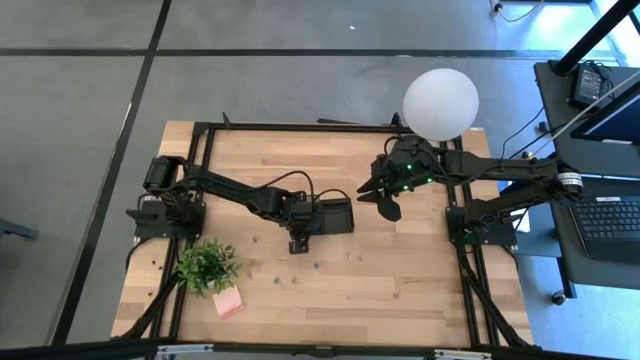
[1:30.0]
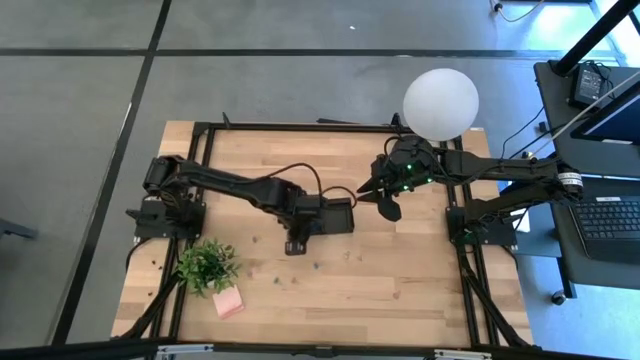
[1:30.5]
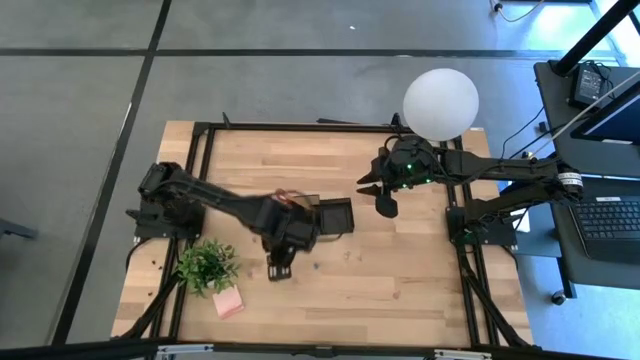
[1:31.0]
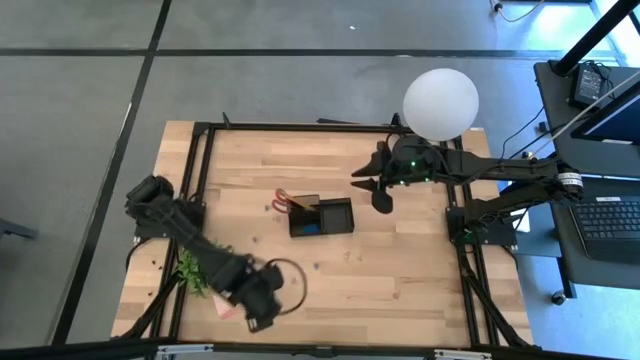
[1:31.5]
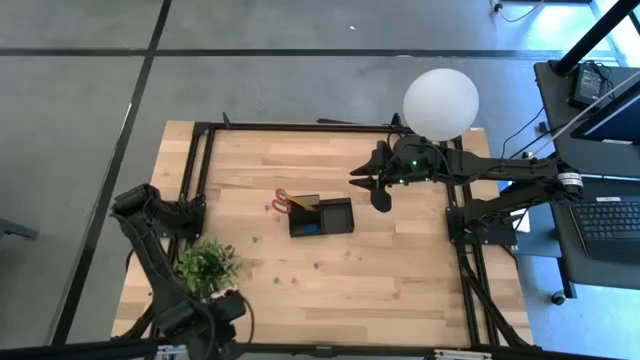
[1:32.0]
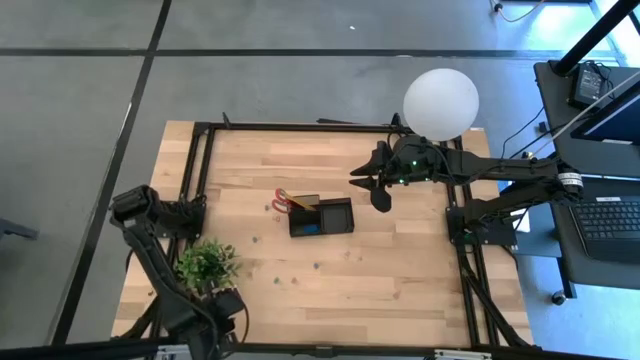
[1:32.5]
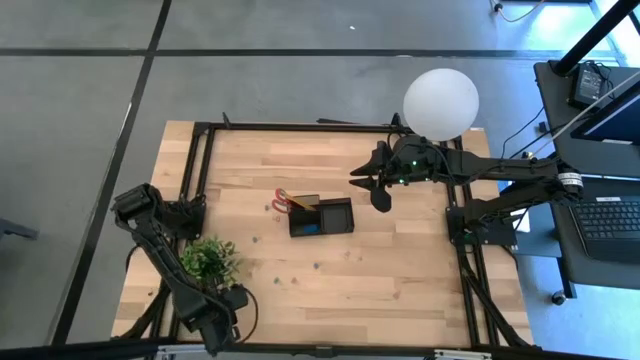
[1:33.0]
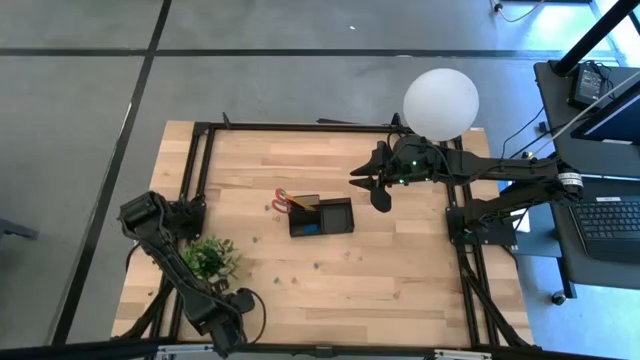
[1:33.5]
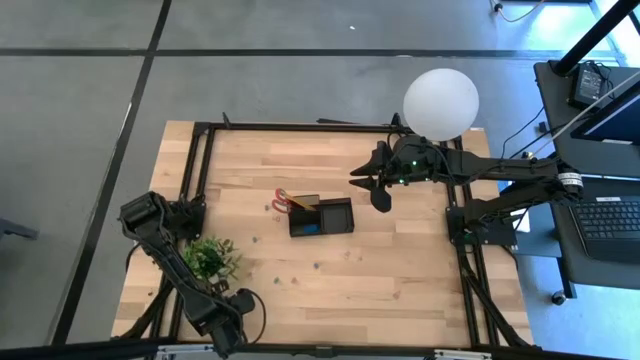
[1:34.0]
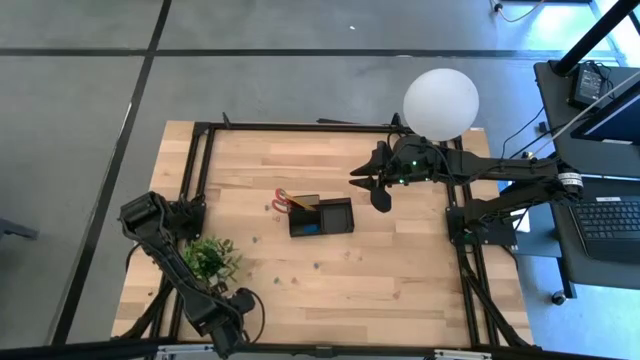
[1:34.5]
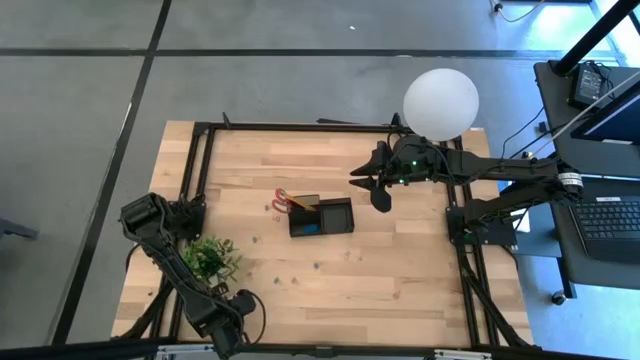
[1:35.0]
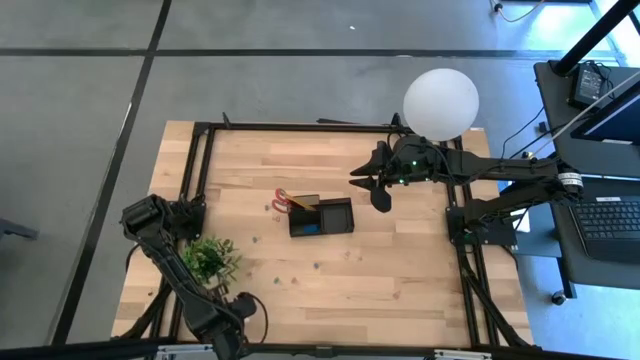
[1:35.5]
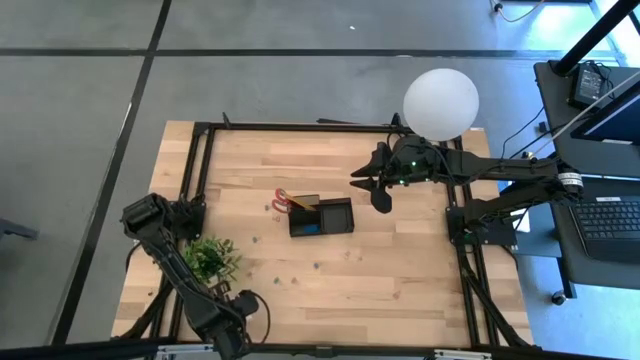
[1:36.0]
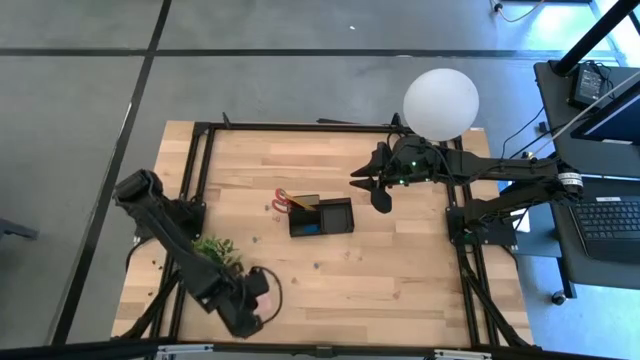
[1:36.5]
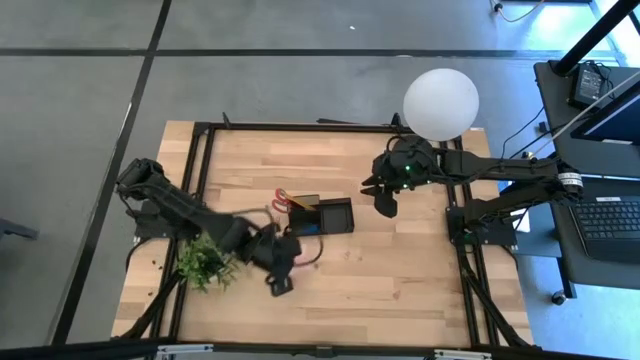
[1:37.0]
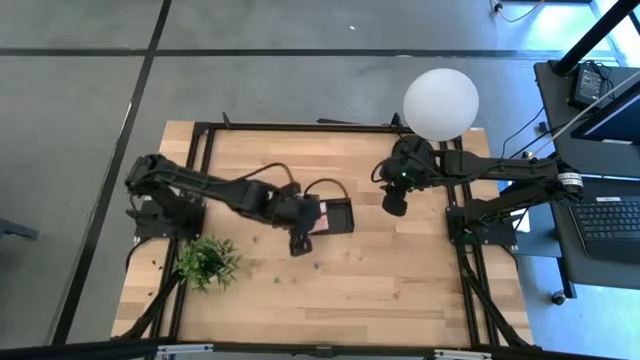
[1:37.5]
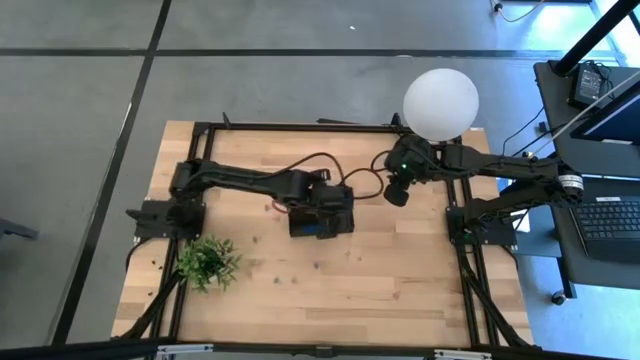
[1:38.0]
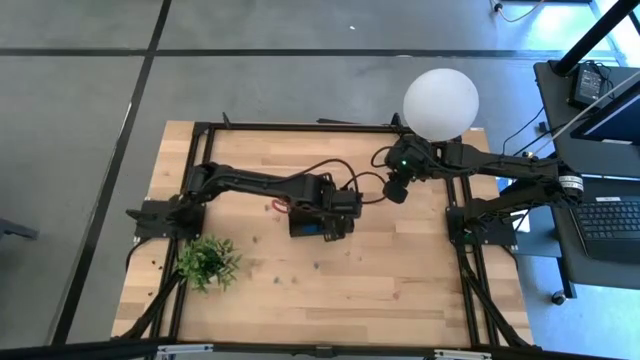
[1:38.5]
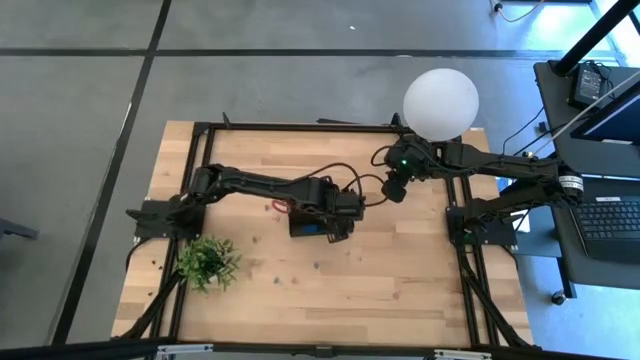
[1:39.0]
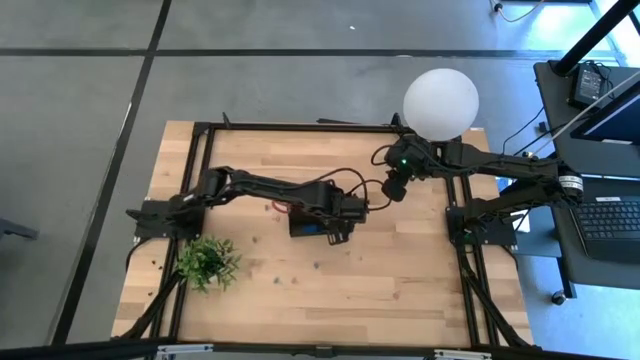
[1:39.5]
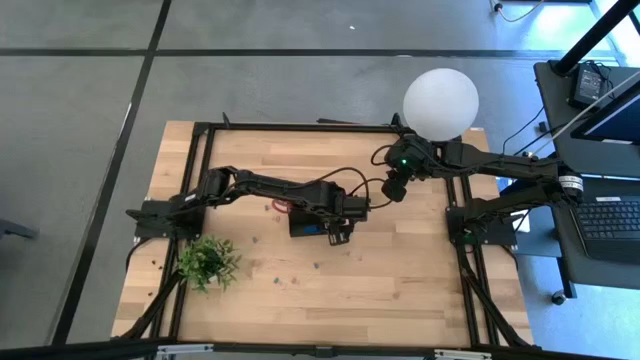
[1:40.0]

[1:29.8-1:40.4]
Task: Pick and place office supplies into organizer
Put the pink sticky notes into the black desk organizer

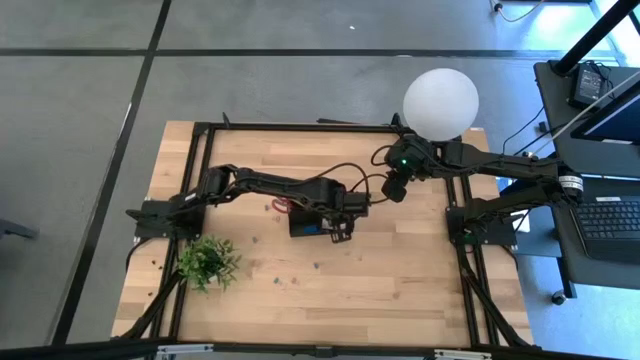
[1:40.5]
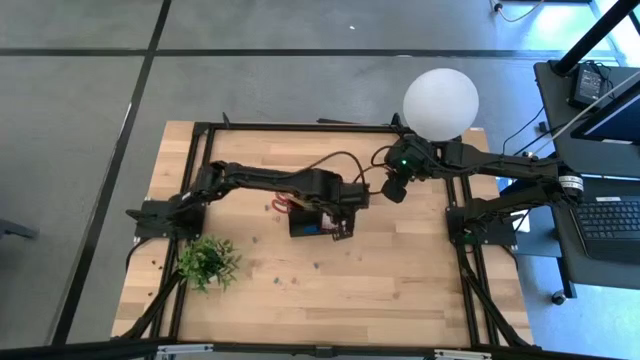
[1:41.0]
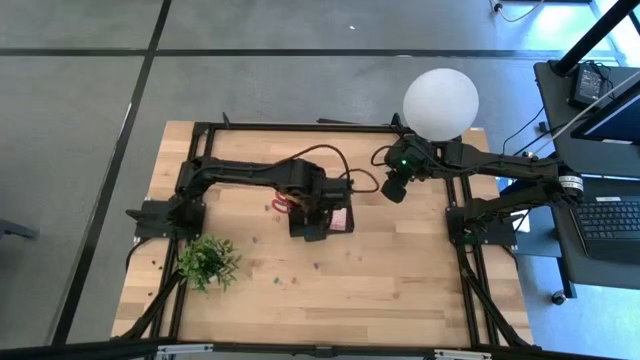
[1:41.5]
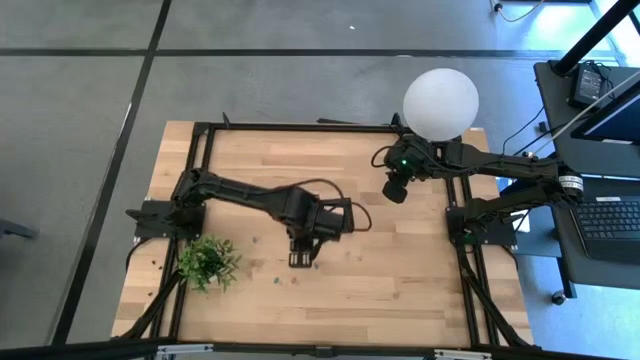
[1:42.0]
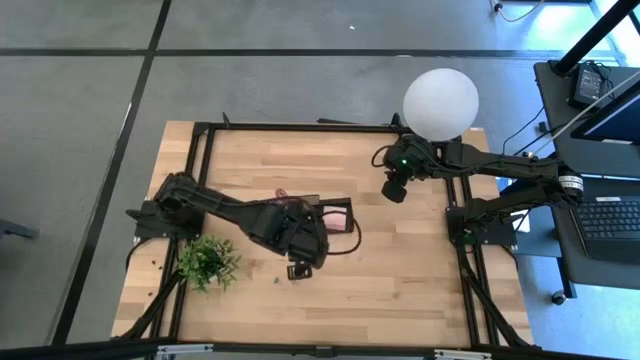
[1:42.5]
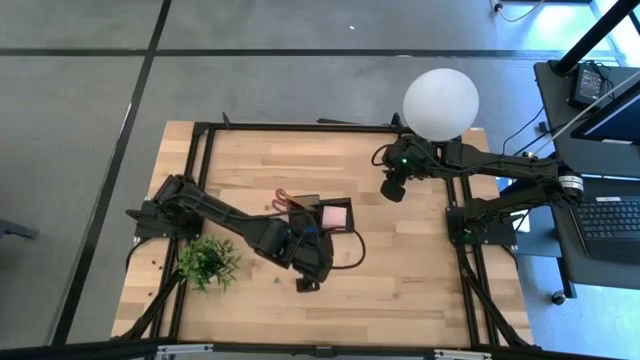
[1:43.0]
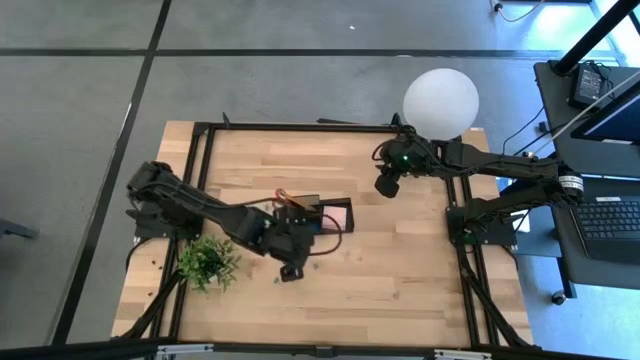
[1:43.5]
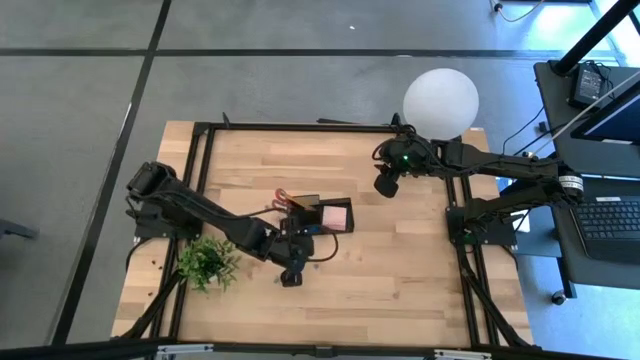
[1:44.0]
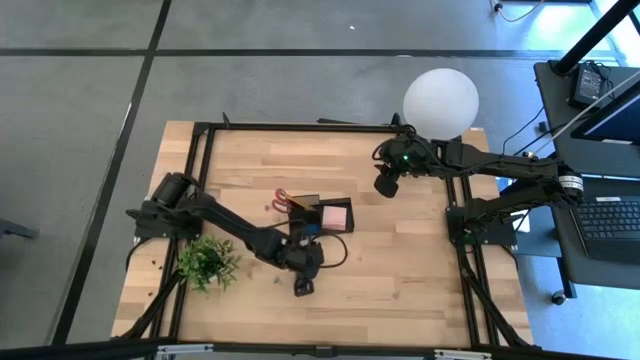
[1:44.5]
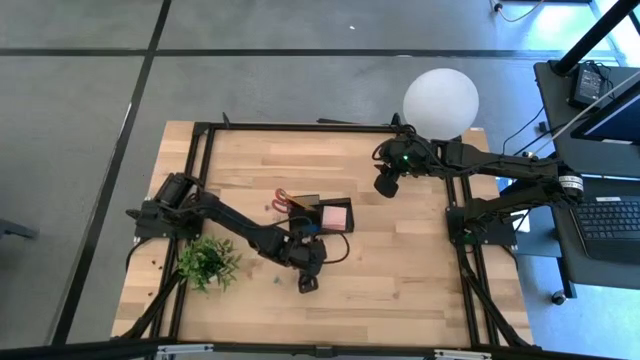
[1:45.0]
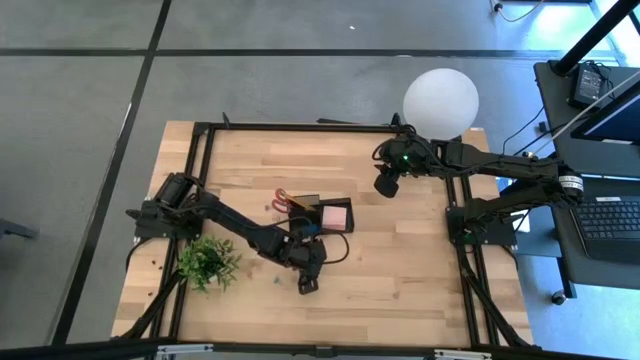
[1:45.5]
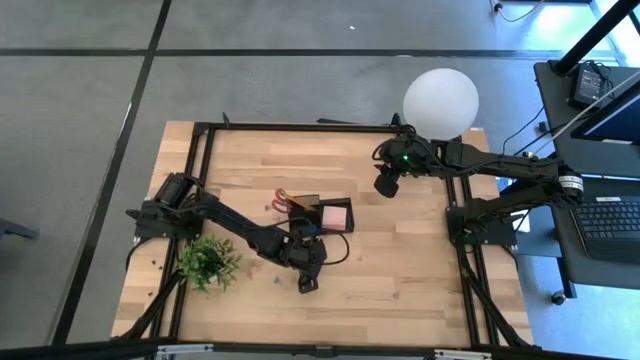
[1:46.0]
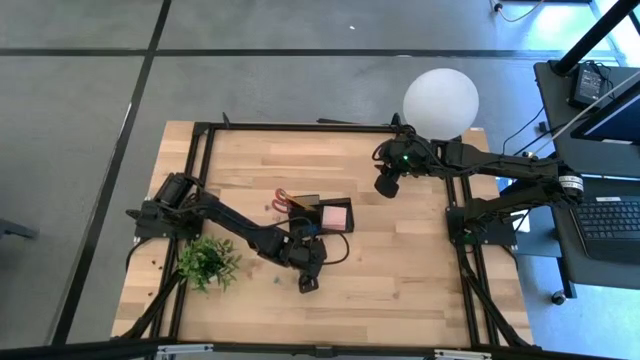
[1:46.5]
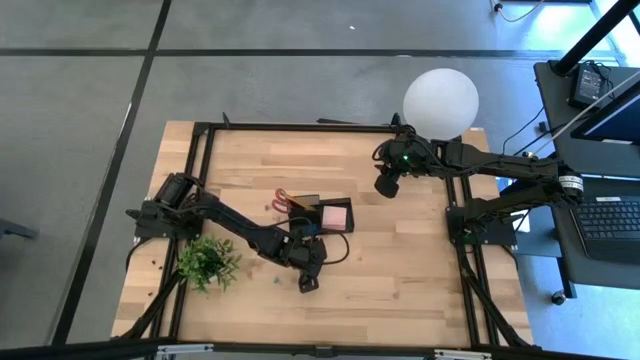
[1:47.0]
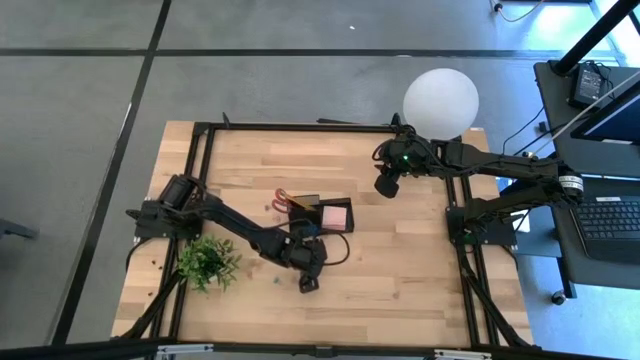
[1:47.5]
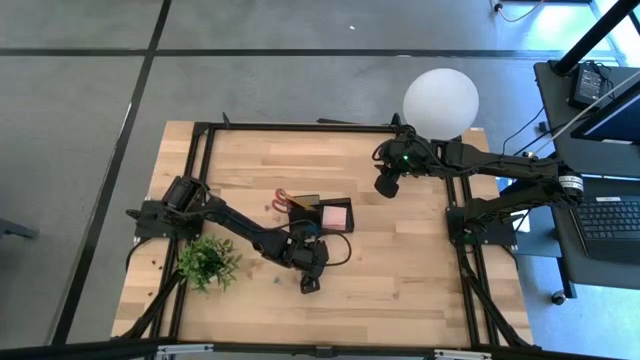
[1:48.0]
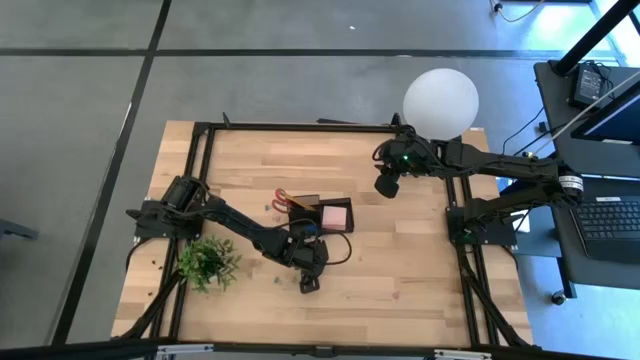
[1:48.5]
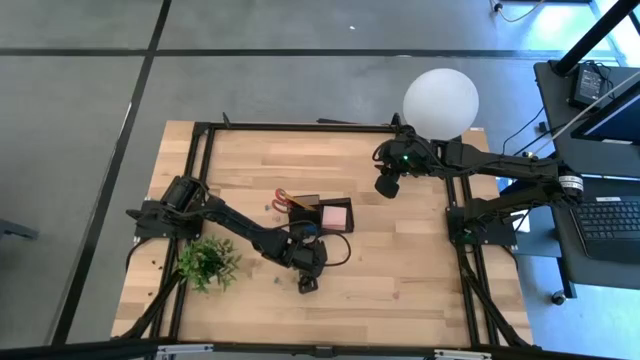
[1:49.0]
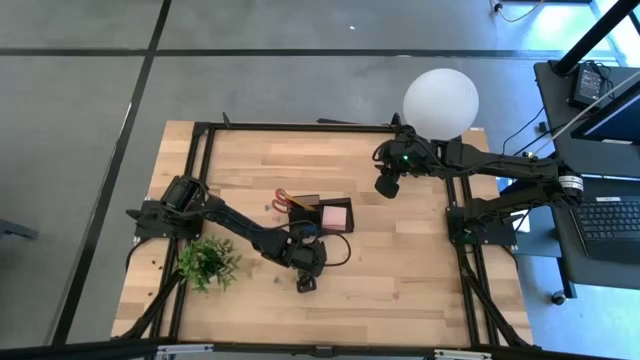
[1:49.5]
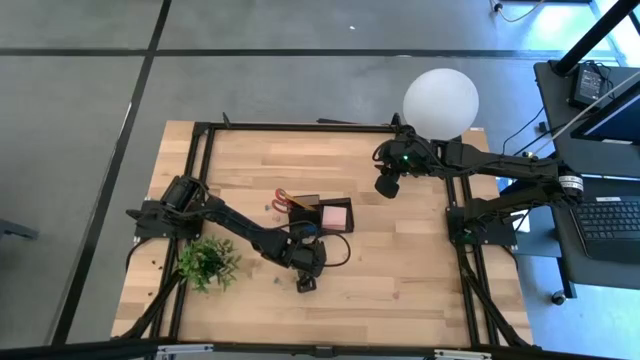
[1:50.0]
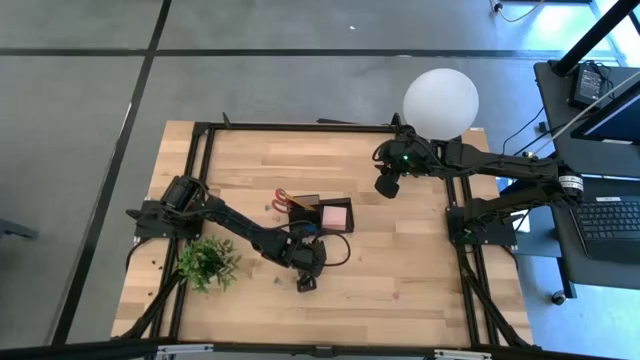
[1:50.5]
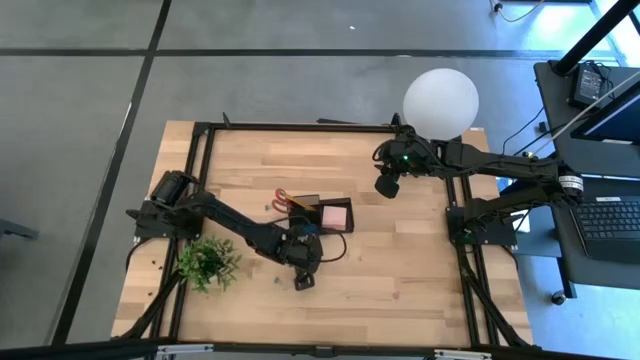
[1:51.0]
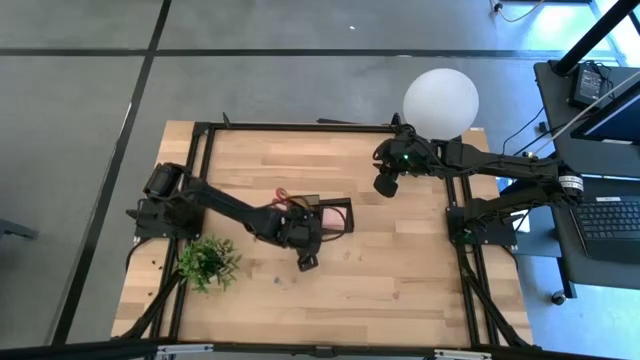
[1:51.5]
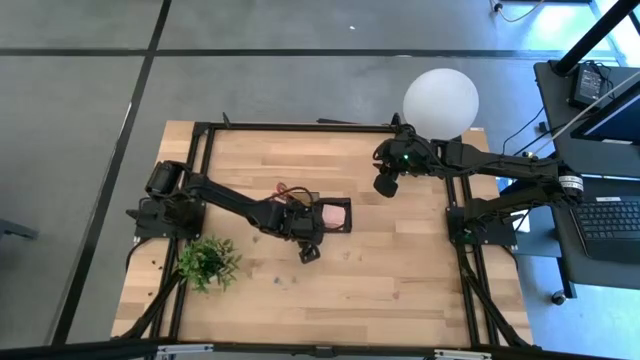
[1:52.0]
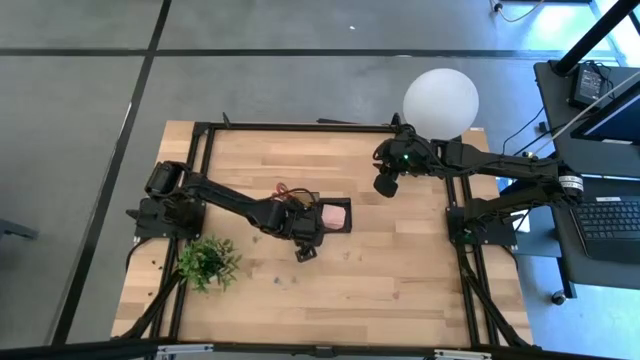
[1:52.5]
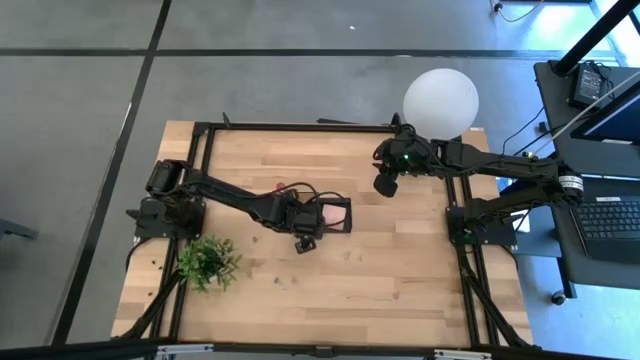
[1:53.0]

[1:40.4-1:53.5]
Put the blue binder clip into the black desk organizer
